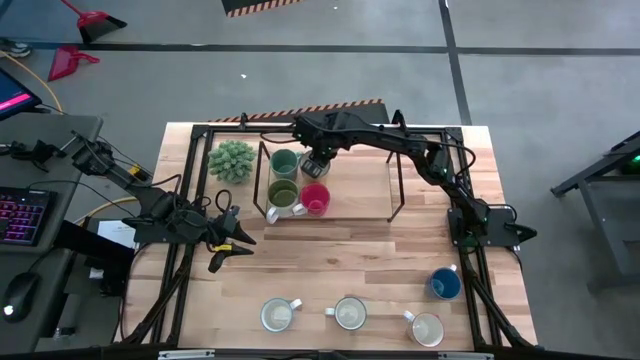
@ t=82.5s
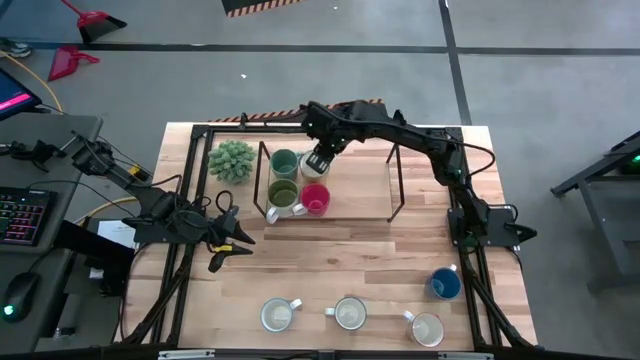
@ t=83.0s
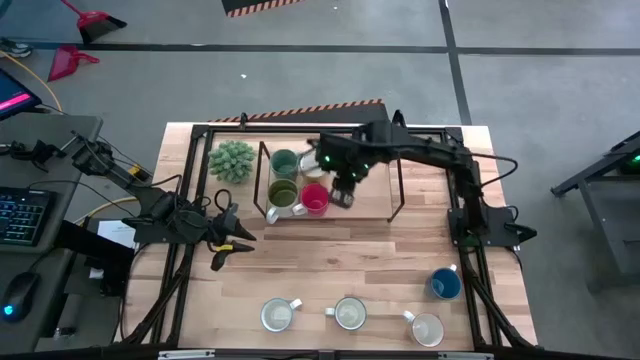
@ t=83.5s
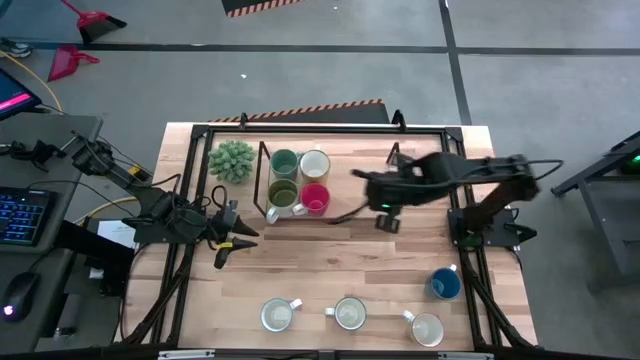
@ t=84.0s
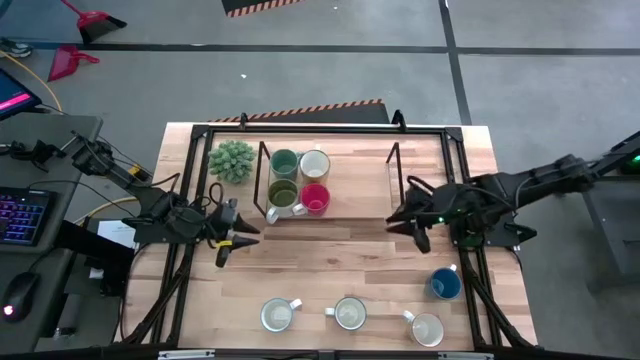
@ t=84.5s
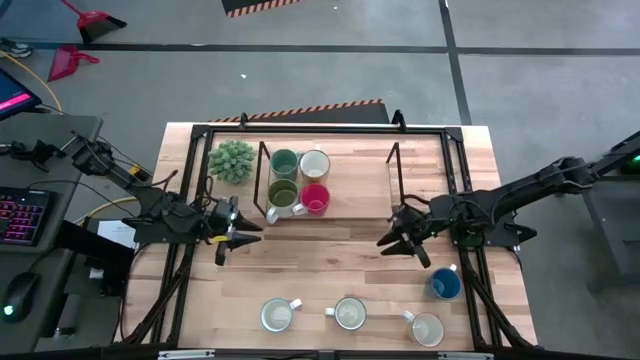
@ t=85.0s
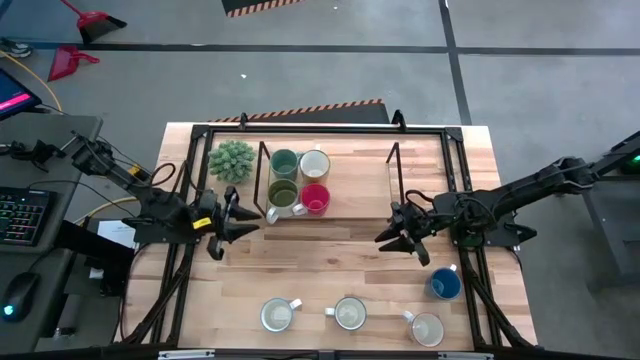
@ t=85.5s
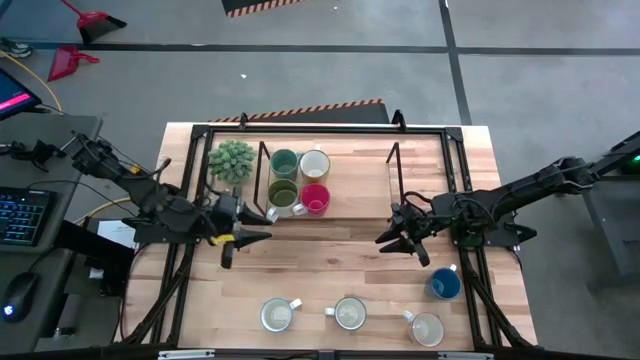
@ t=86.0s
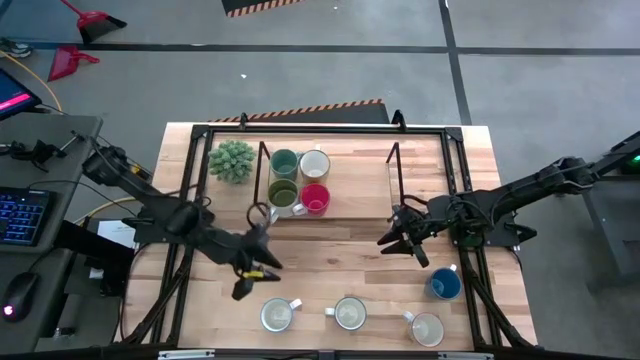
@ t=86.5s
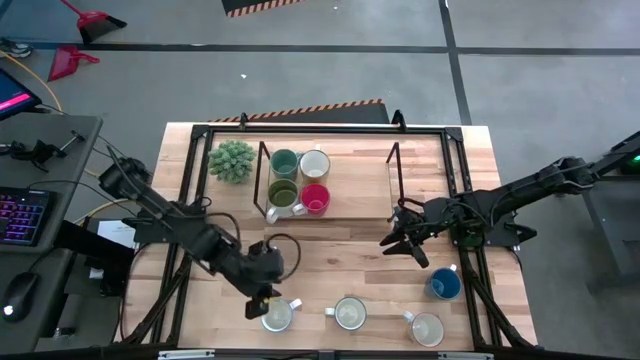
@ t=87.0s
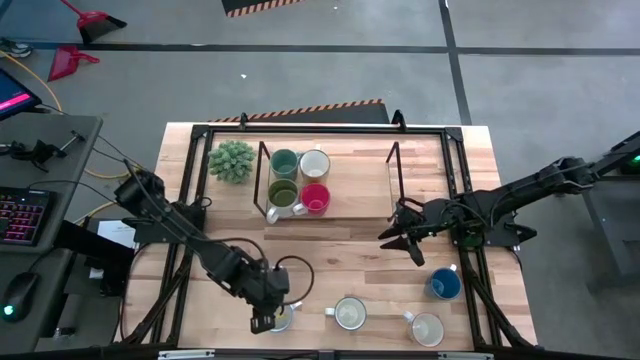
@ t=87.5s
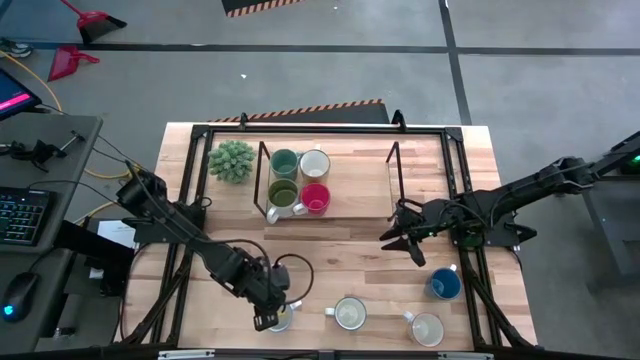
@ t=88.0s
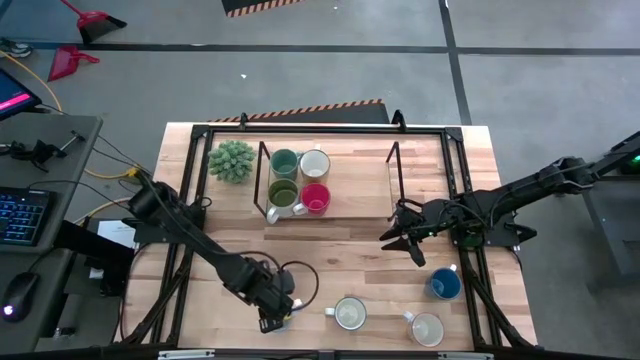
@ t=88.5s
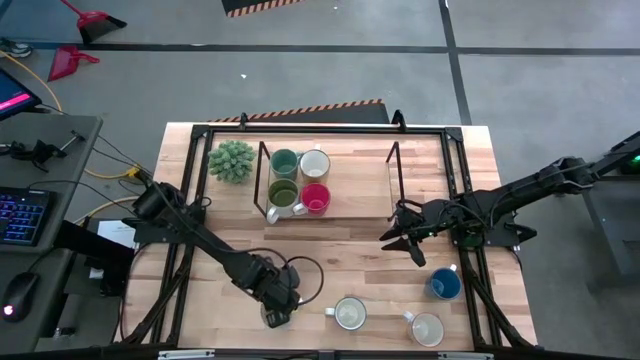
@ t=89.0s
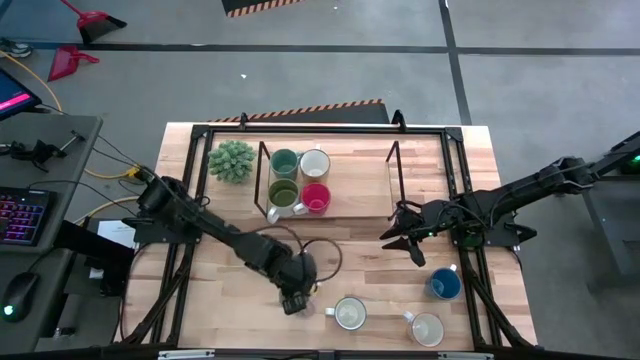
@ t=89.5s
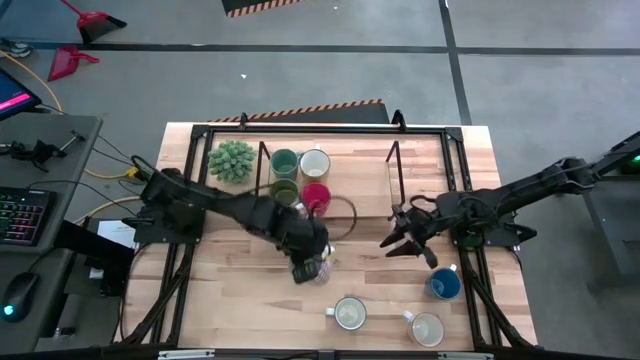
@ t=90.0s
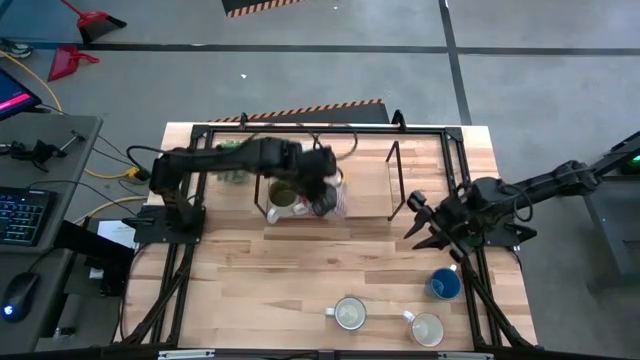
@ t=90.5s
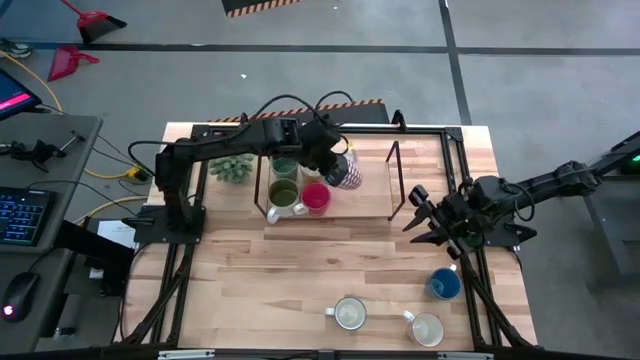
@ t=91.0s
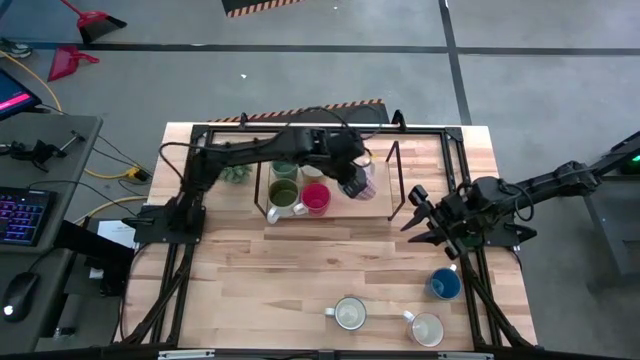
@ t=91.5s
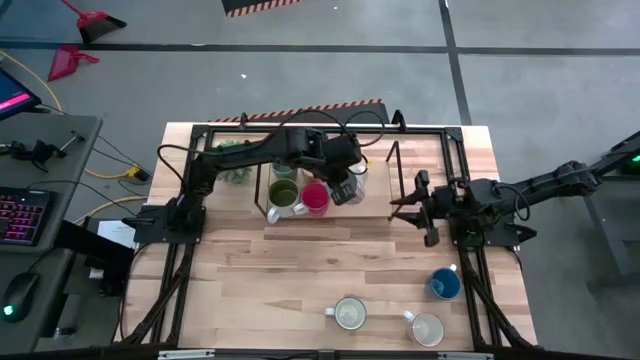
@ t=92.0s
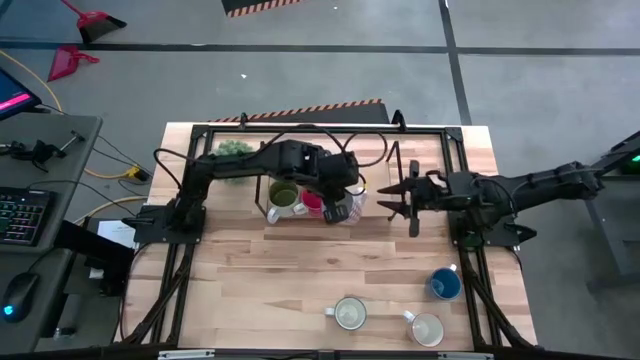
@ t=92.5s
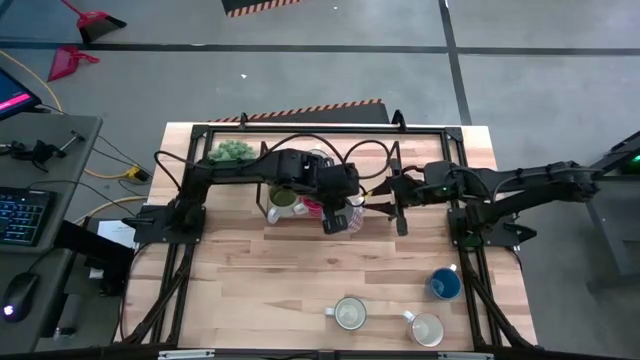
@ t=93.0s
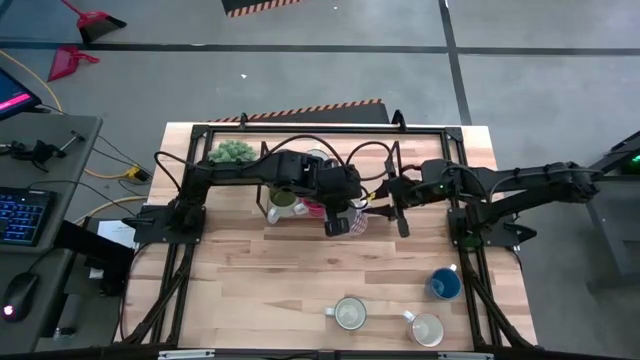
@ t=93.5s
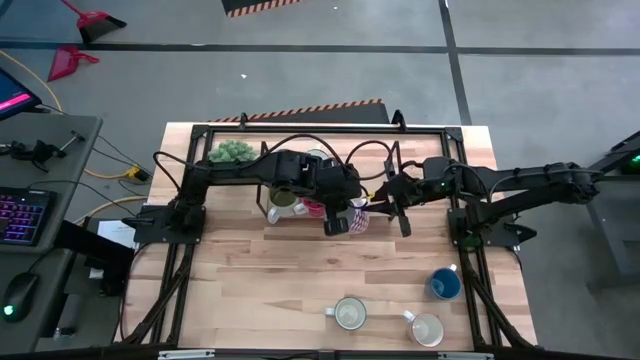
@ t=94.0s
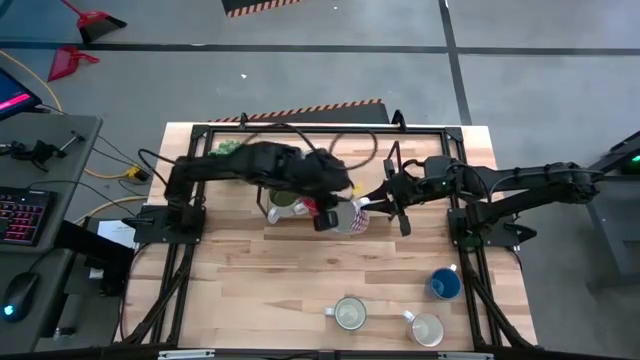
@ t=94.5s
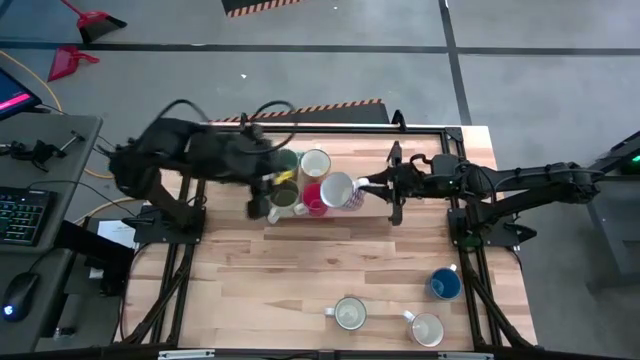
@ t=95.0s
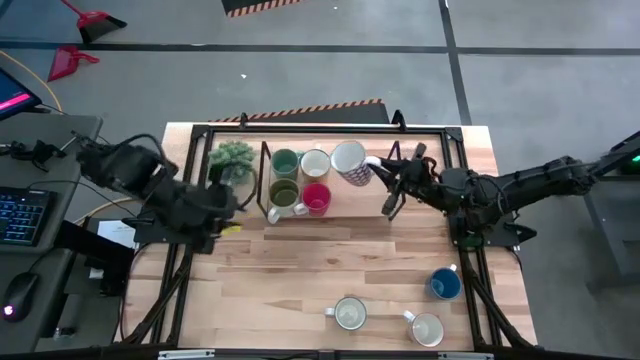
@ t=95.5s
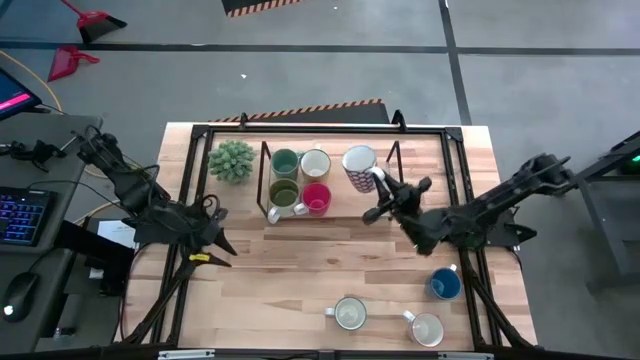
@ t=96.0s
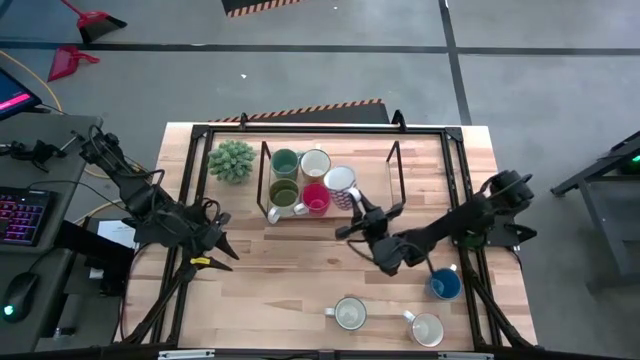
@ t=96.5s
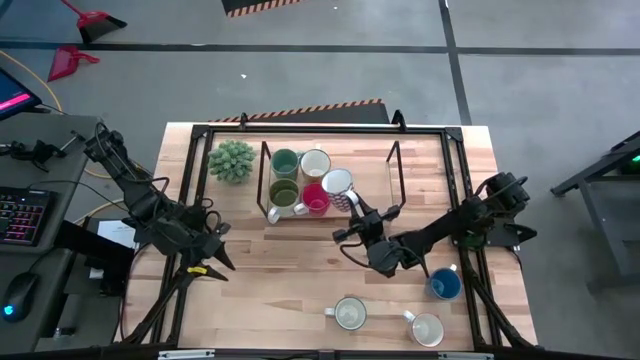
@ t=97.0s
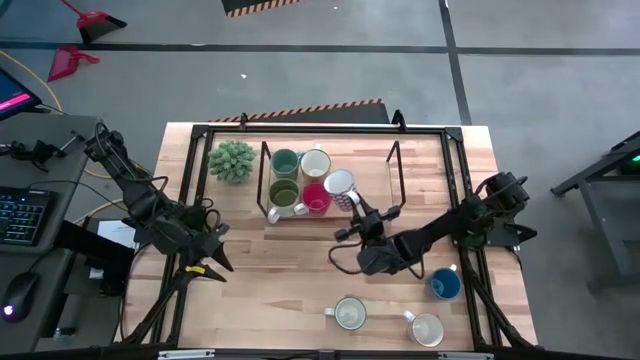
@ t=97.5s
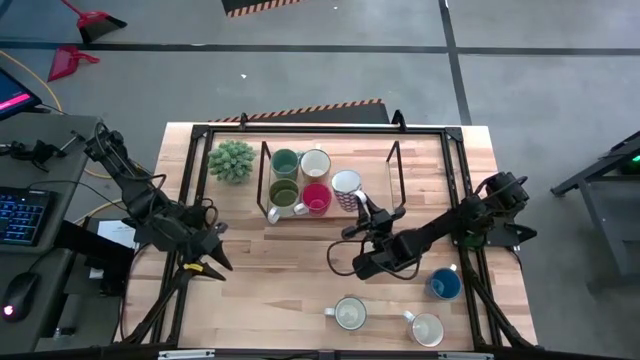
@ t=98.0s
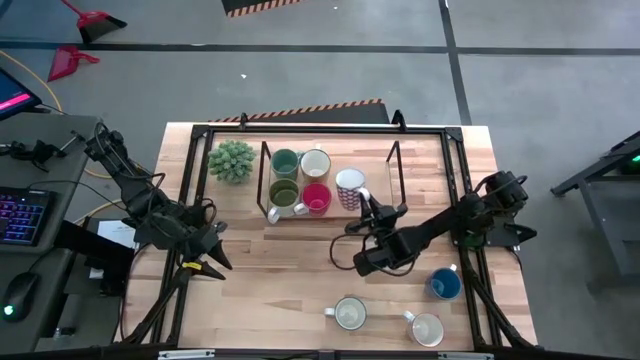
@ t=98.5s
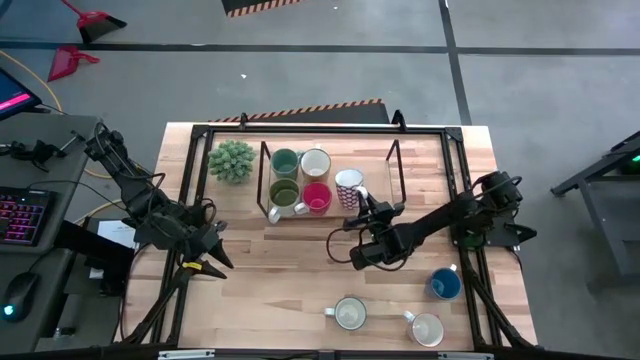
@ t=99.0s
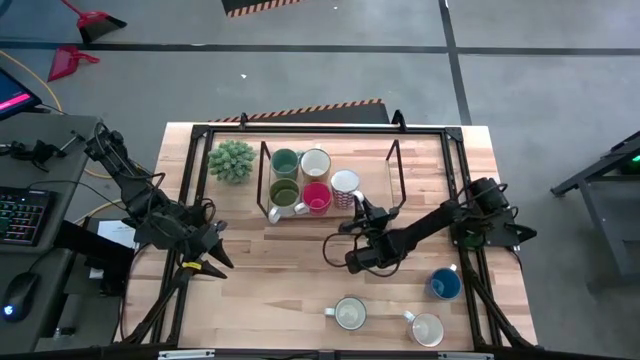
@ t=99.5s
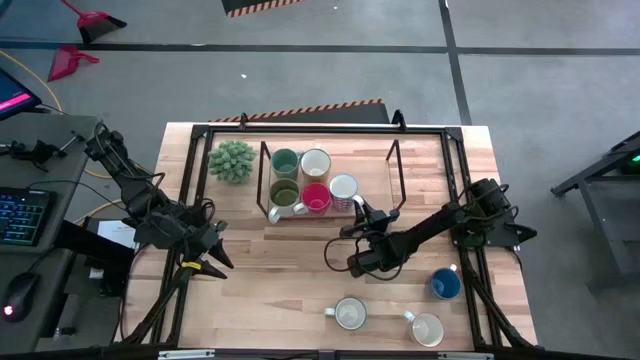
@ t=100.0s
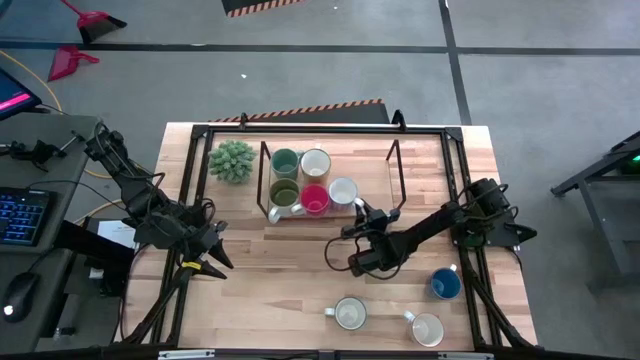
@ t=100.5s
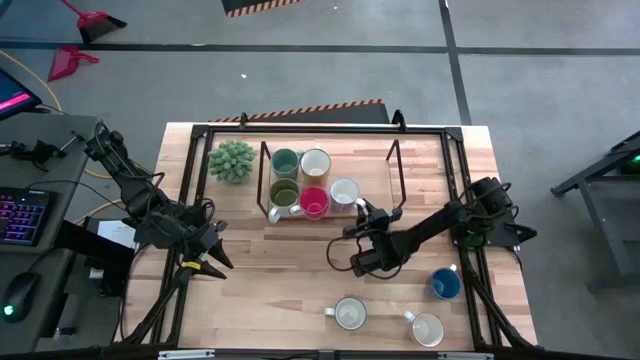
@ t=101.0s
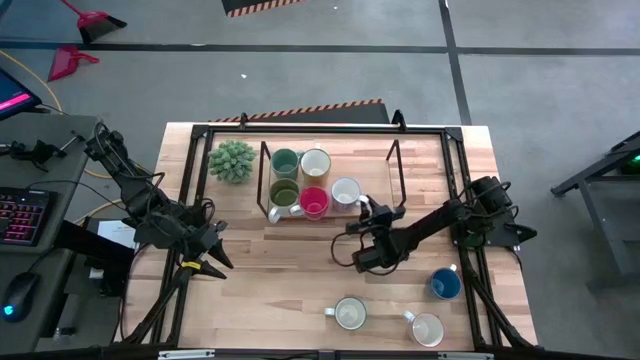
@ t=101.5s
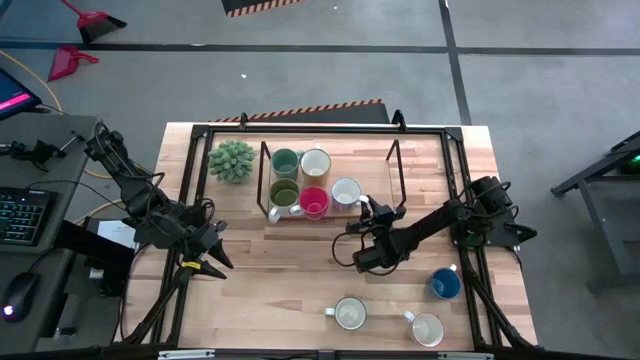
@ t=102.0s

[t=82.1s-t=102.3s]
Task: Place coffee mugs
Put the red patterned mug on the shelf
